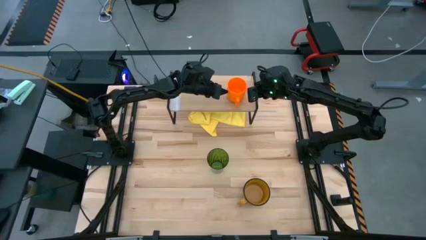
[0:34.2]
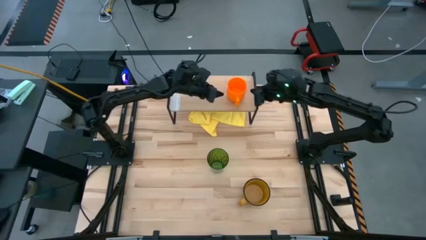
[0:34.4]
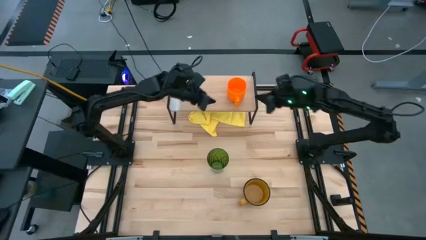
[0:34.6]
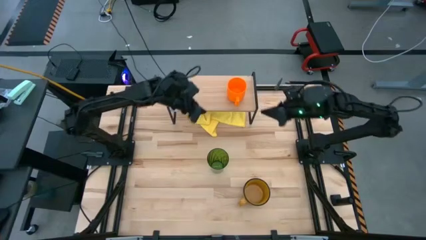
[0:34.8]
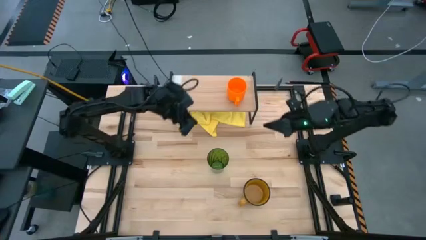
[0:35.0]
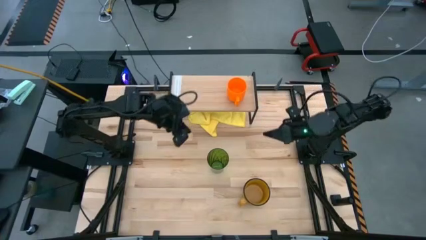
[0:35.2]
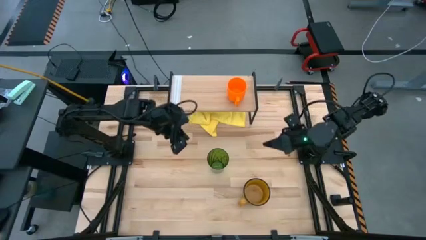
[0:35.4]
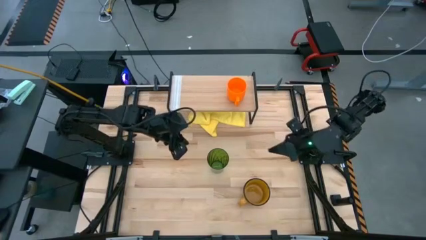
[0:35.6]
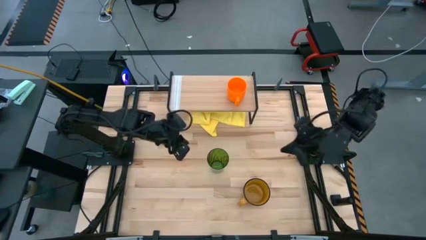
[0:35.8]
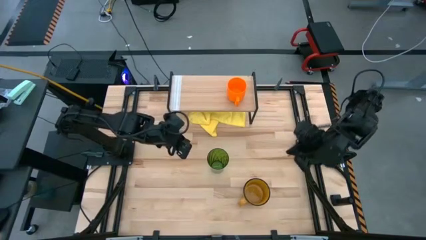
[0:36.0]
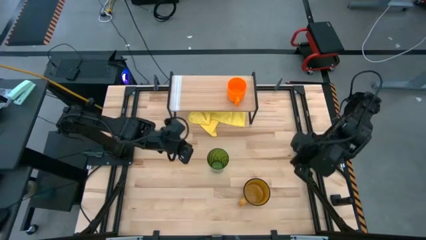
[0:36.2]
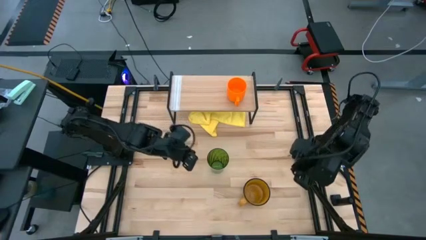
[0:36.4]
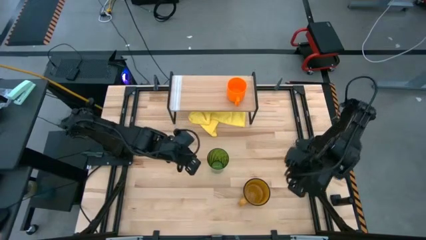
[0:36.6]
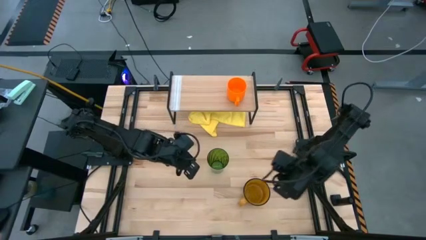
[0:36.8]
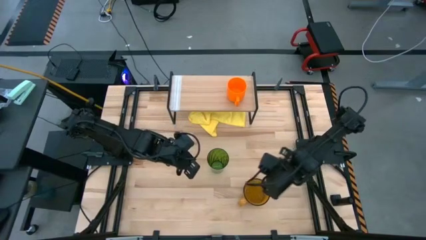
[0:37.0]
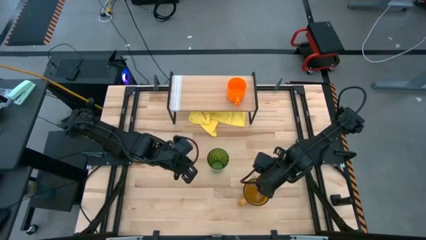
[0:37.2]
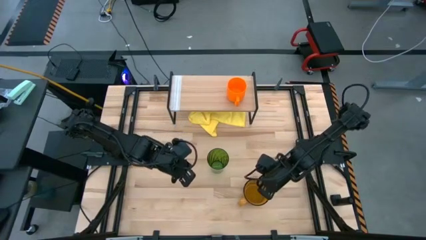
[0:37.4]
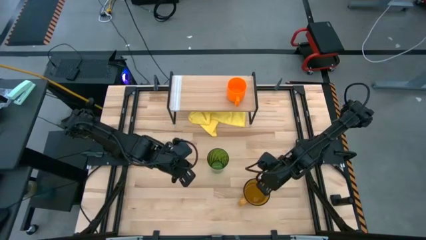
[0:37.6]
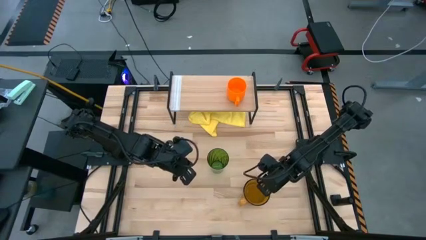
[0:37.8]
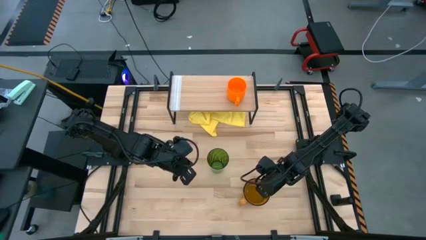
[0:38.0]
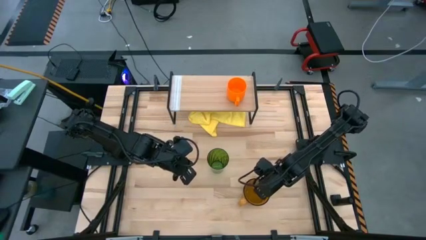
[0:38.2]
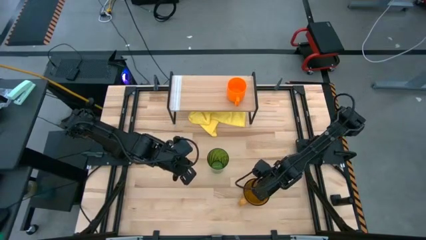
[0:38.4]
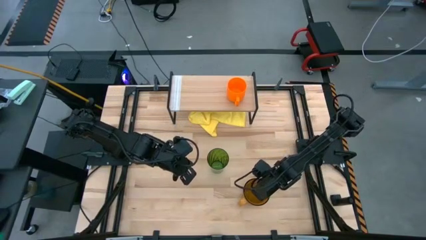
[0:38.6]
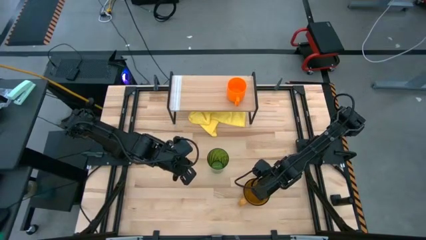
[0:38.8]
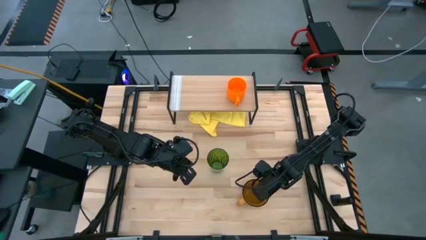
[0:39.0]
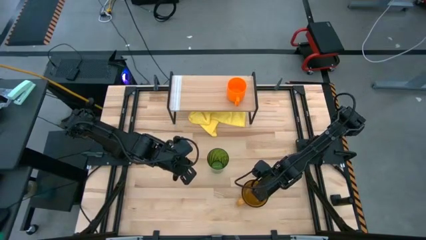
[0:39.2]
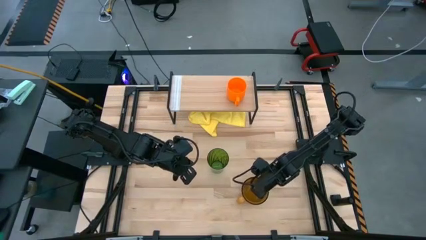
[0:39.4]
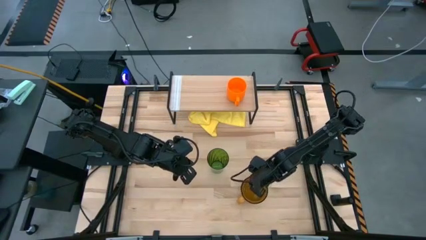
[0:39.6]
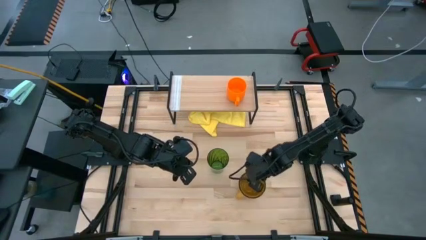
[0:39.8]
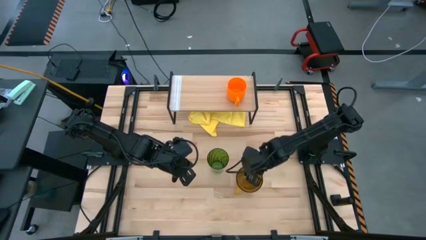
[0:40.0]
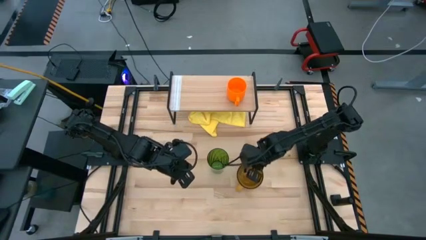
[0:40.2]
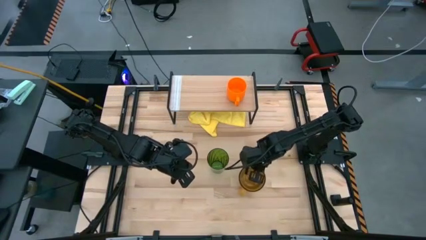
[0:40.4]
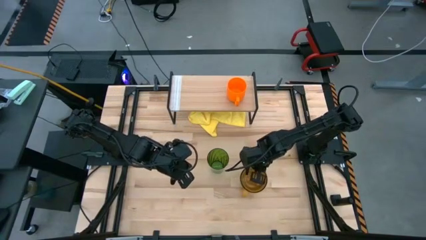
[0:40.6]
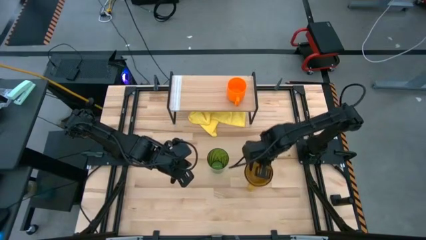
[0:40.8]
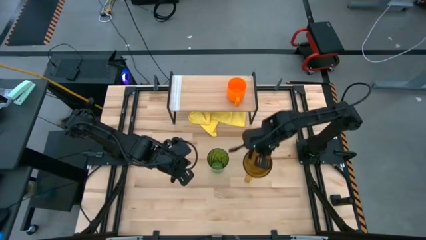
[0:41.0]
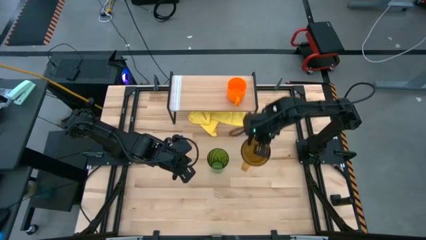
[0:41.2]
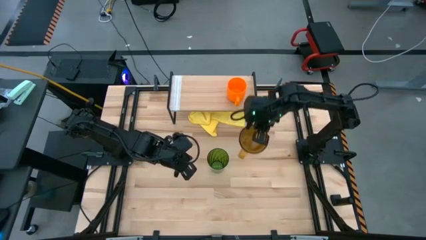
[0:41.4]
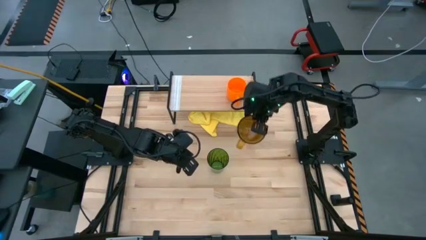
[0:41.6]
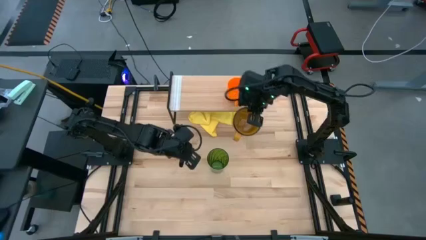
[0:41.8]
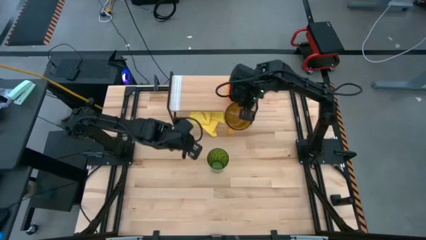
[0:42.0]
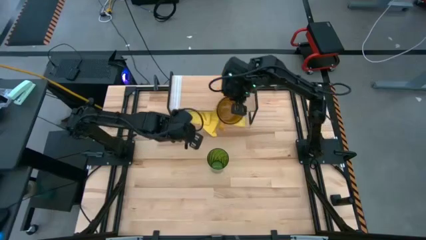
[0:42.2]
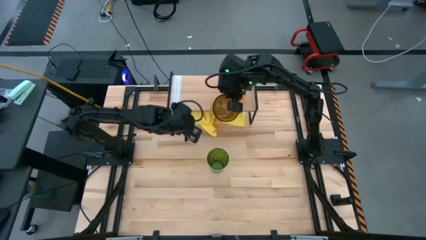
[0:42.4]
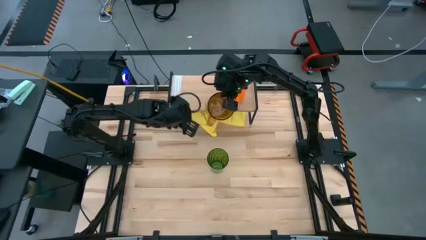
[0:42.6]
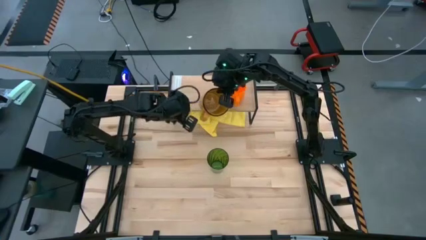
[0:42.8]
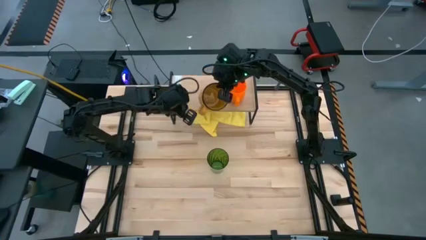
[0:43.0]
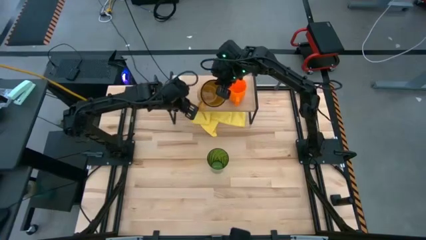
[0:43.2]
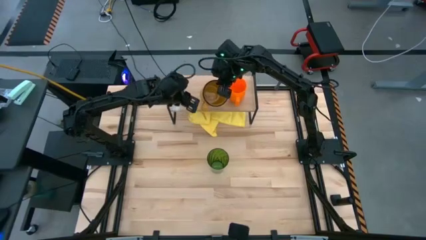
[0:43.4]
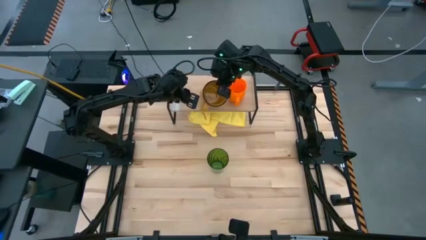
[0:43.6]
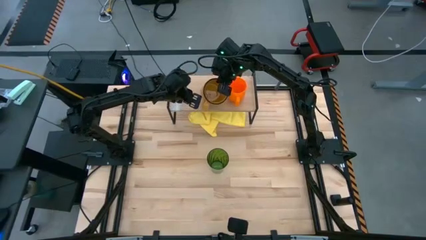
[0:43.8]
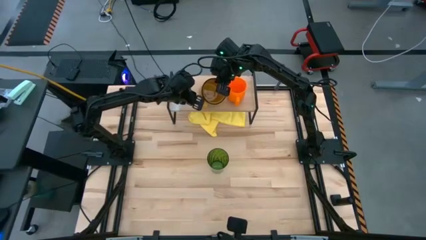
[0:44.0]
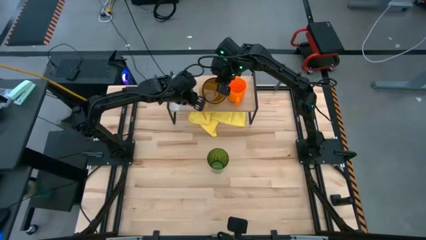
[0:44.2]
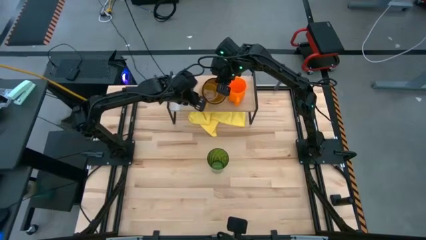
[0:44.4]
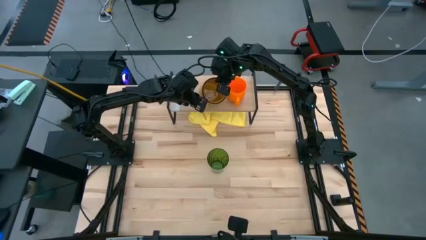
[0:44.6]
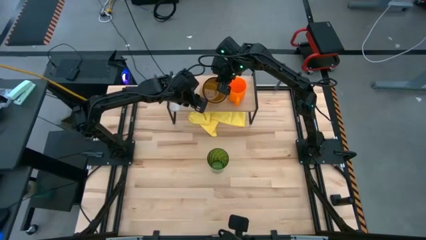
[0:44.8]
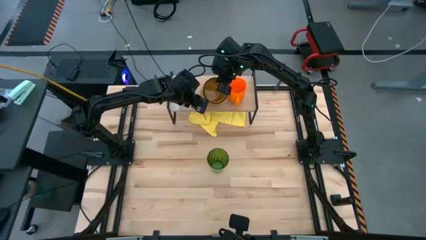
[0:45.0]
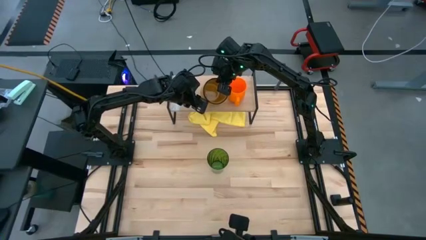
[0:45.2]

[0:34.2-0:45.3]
Task: Stack small to large cups/mugs on shelf
Put the yellow mug on the shelf

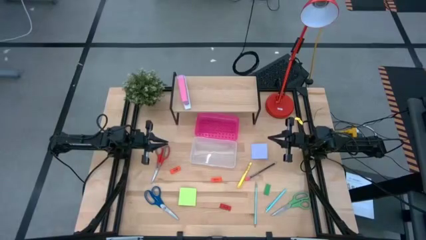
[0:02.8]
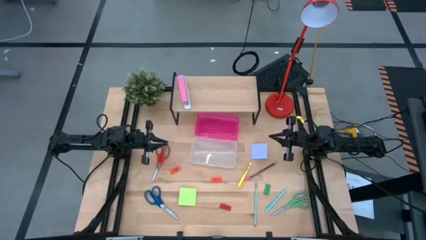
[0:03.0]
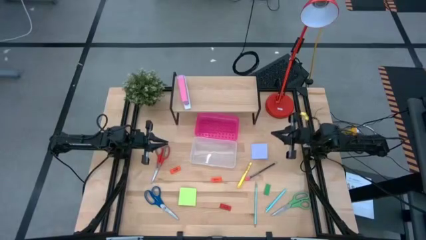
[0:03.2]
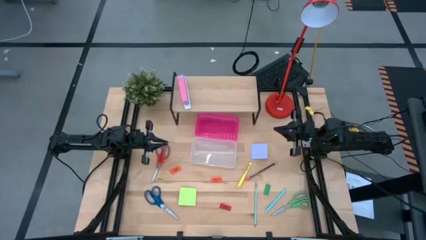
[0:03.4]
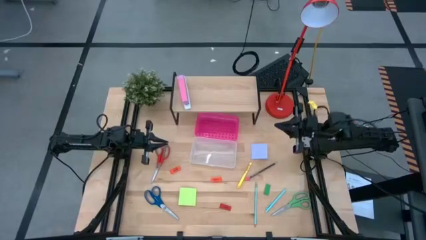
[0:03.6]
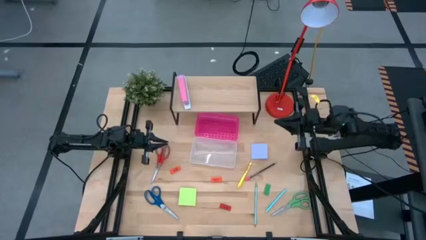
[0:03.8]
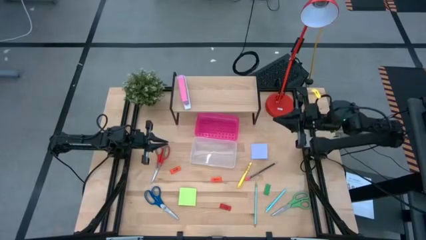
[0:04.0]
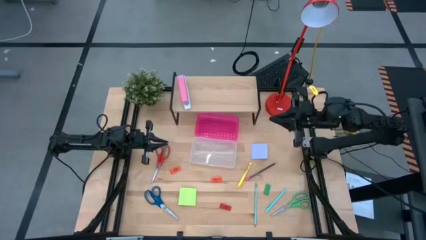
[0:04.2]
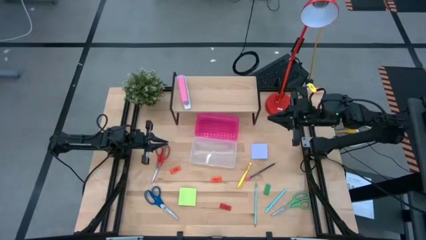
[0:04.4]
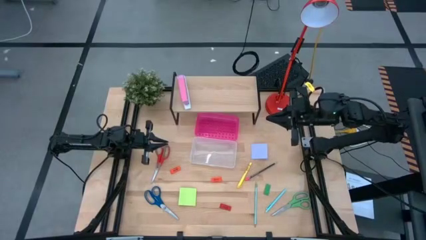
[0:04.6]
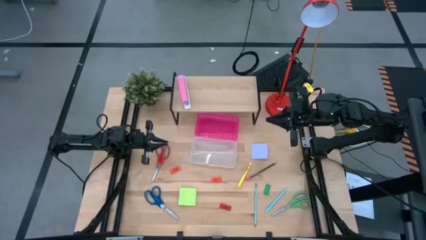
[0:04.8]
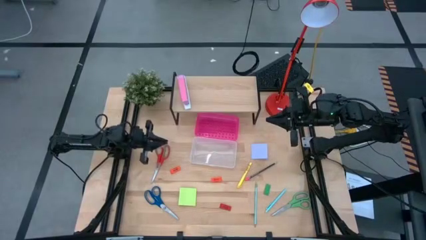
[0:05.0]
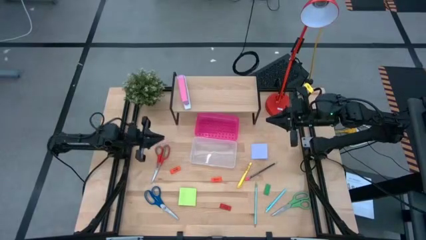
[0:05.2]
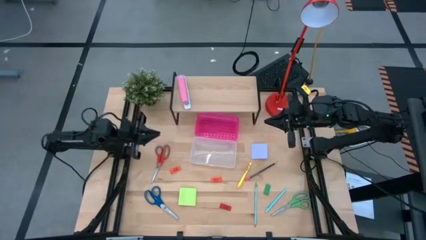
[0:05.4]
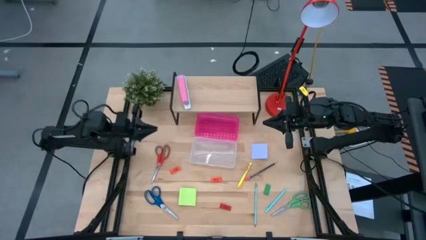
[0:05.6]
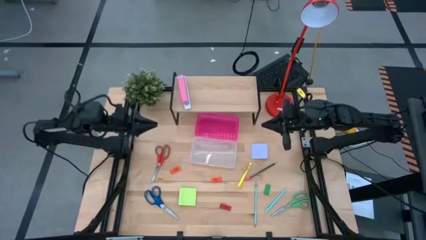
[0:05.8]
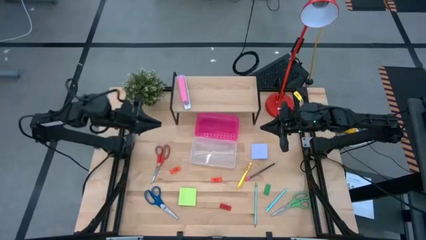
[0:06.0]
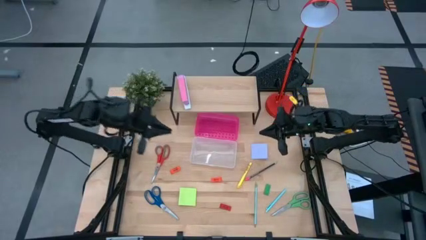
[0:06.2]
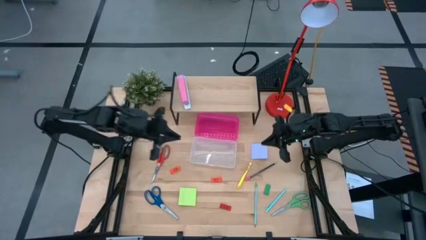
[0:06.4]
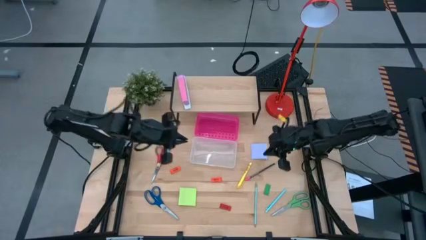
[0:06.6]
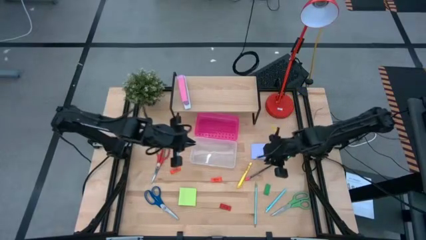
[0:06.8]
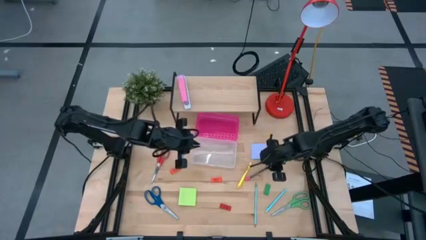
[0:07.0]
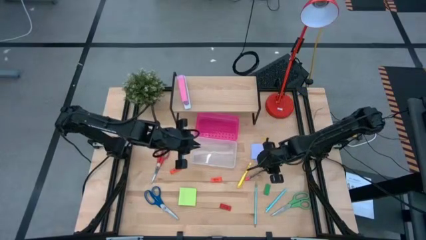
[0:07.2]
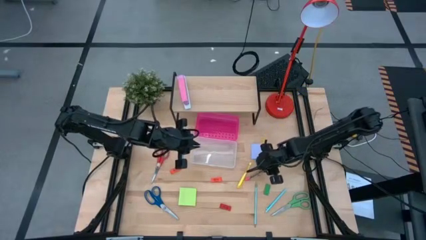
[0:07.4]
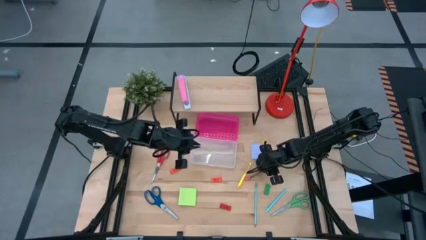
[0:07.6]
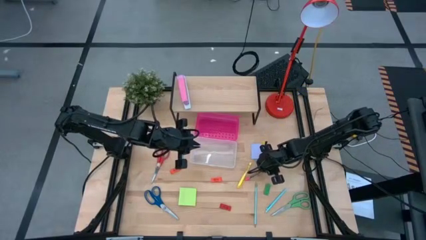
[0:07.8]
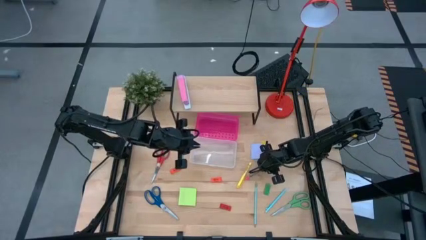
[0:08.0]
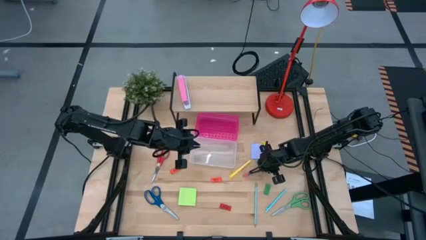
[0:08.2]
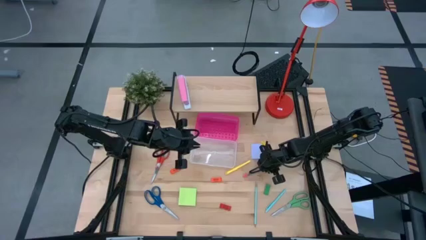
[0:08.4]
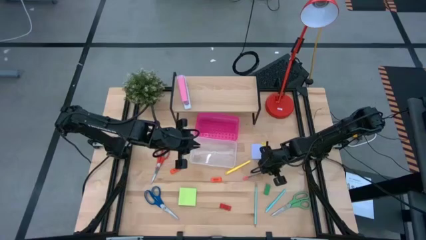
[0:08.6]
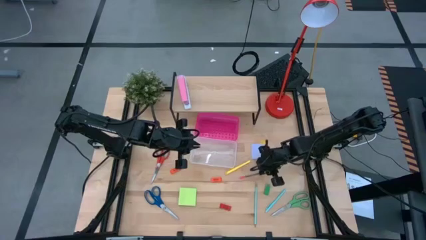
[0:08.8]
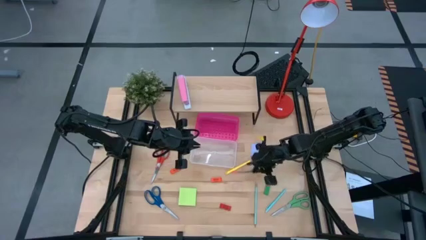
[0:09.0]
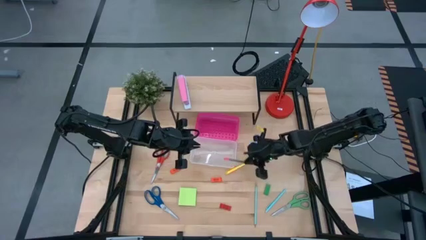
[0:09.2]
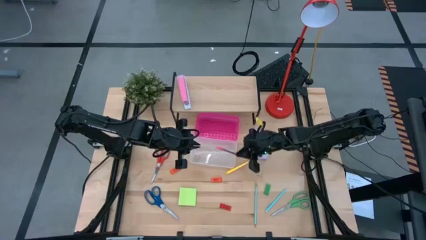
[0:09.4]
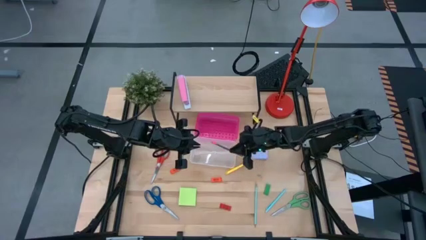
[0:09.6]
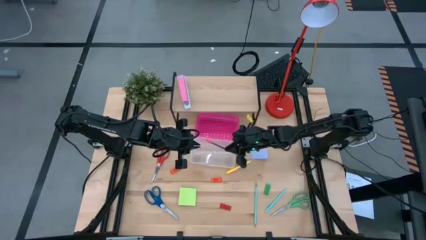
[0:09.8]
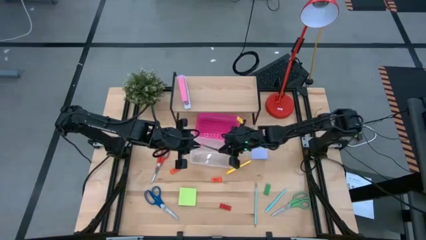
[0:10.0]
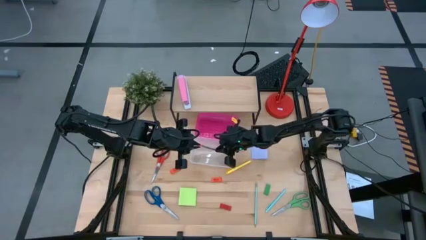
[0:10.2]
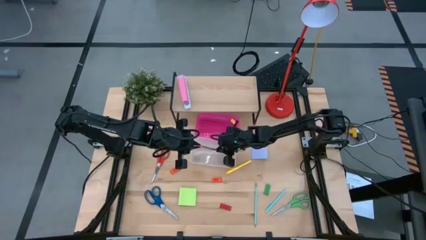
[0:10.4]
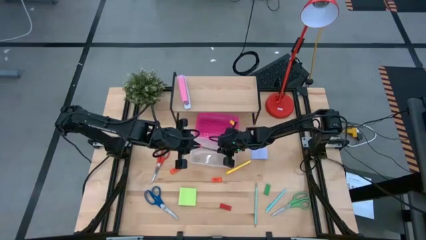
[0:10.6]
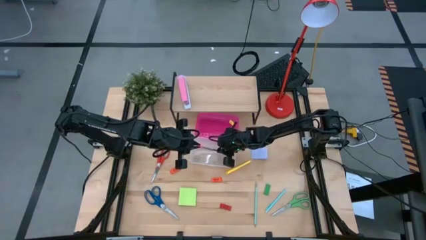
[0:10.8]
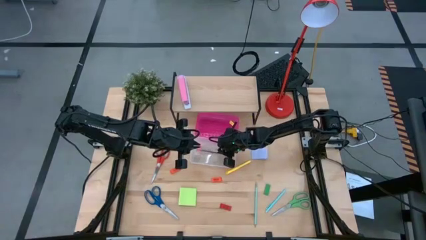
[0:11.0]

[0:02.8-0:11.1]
Task: Pack school essentials
Put the black pencil into the supply box
